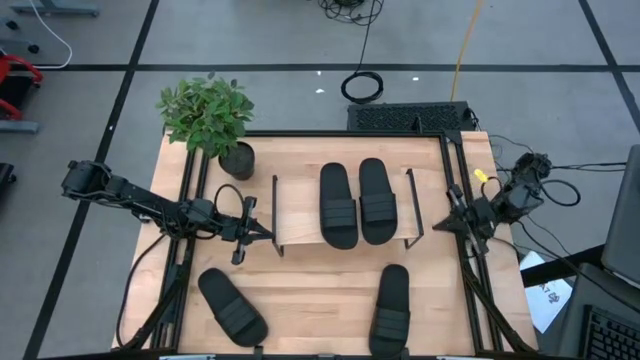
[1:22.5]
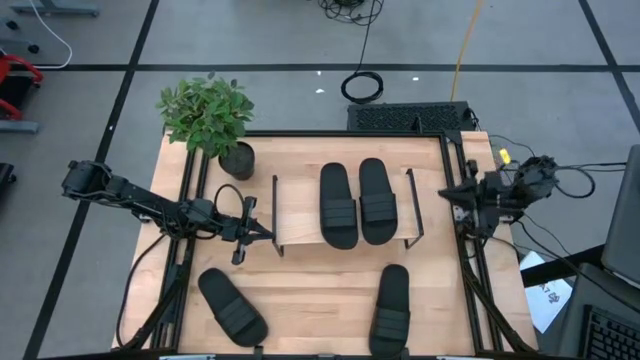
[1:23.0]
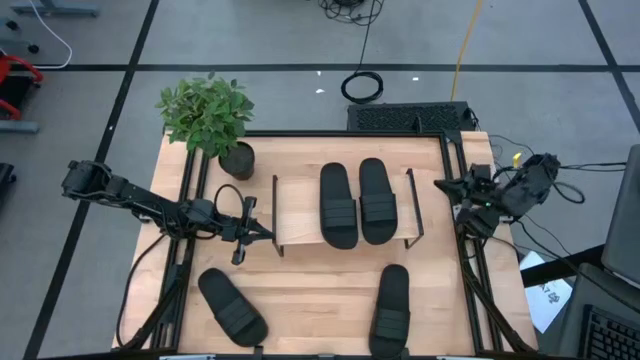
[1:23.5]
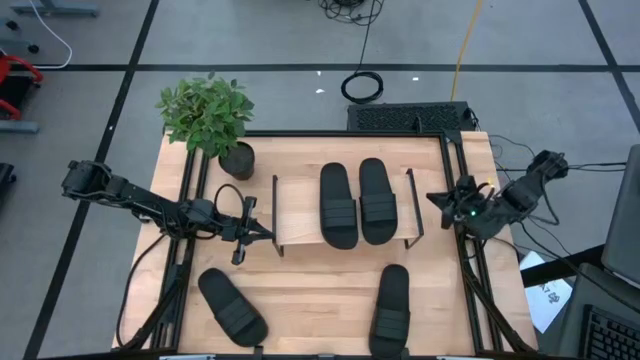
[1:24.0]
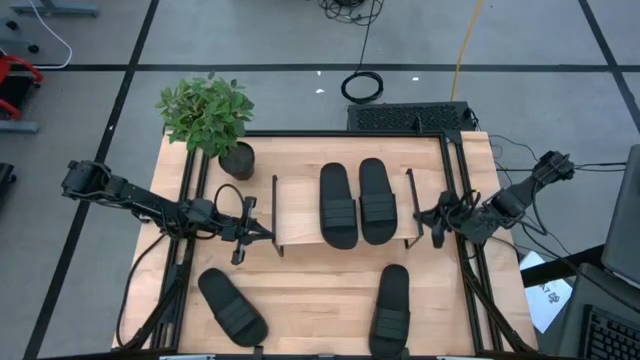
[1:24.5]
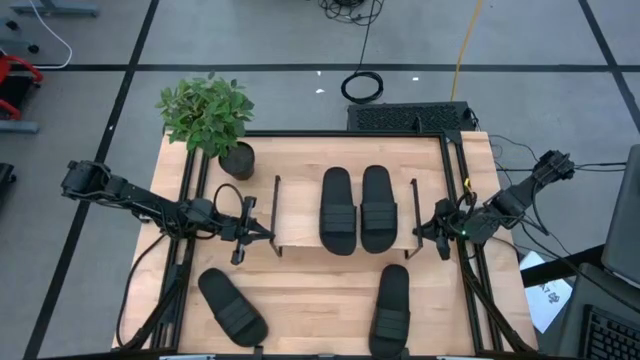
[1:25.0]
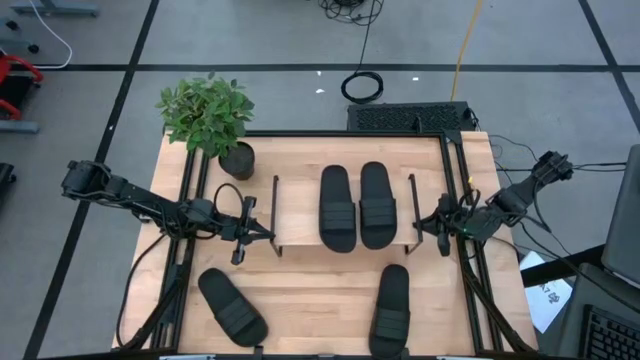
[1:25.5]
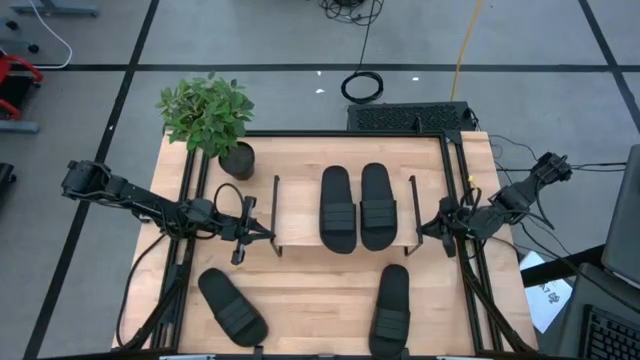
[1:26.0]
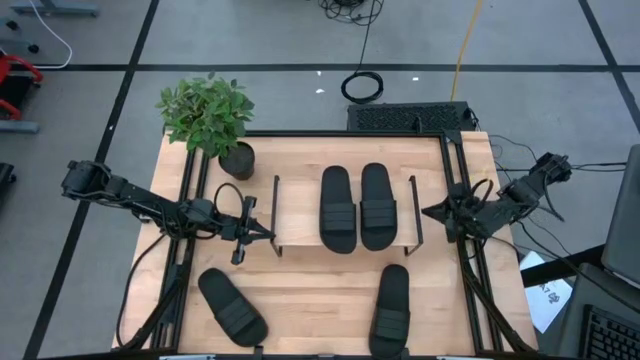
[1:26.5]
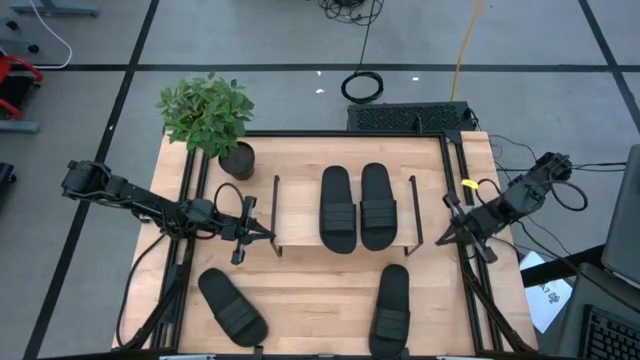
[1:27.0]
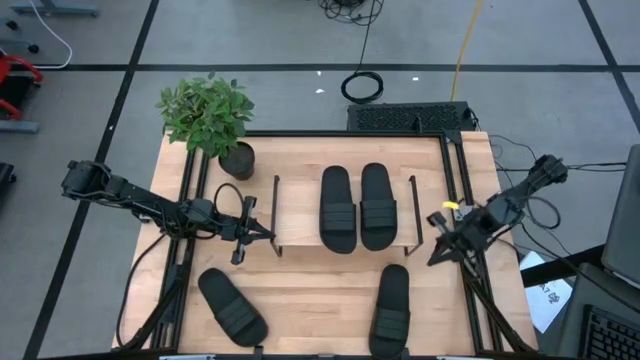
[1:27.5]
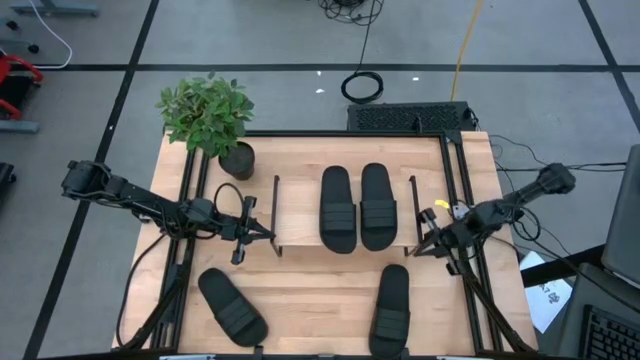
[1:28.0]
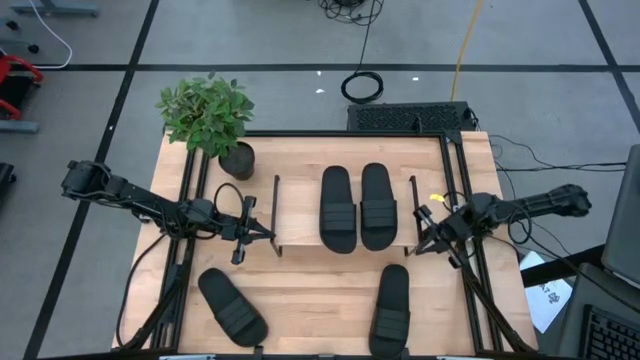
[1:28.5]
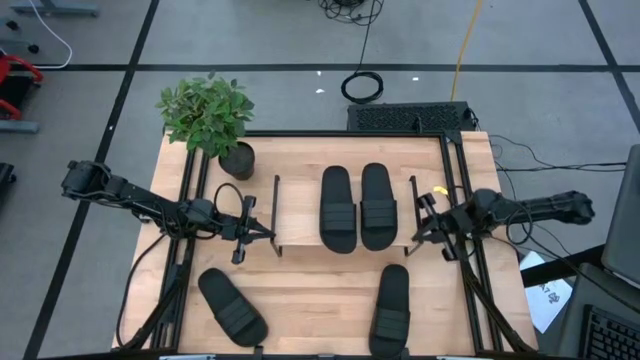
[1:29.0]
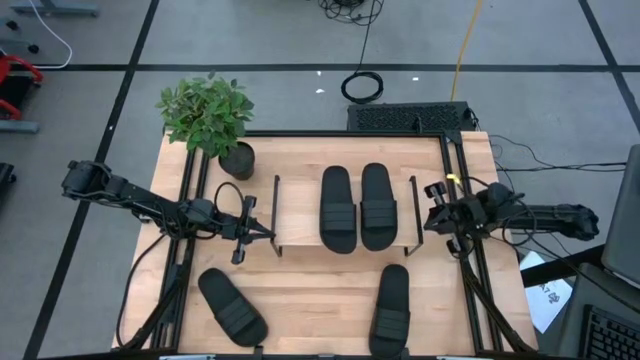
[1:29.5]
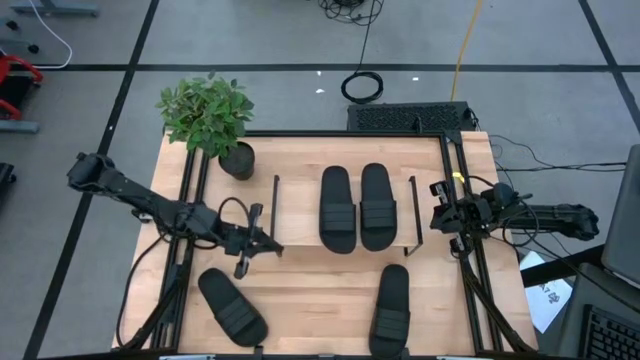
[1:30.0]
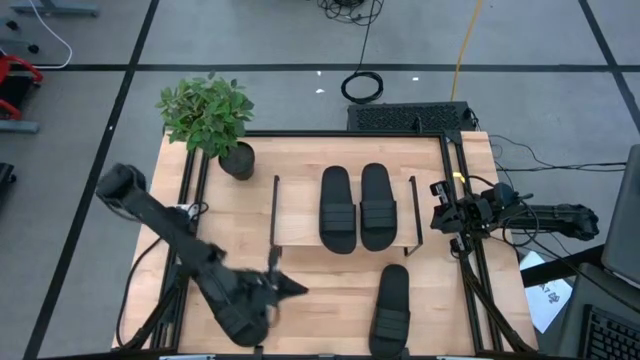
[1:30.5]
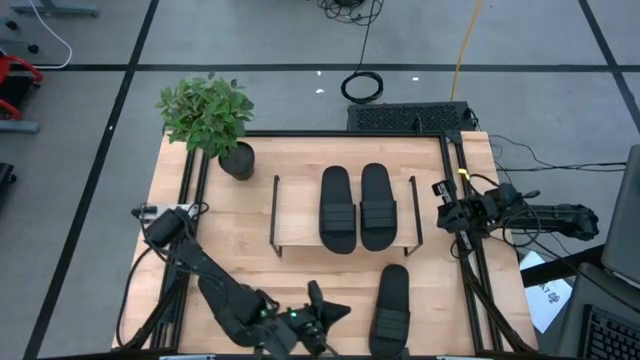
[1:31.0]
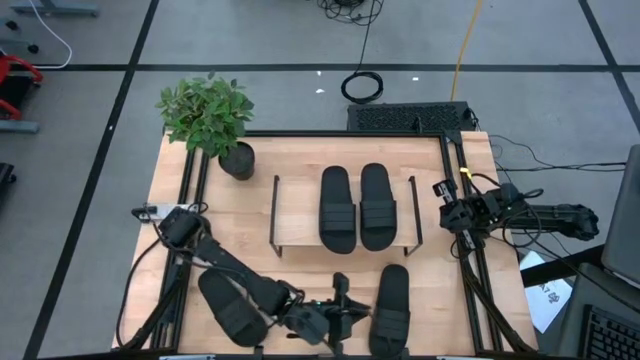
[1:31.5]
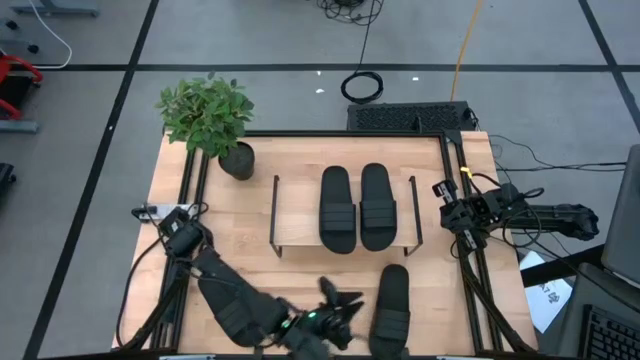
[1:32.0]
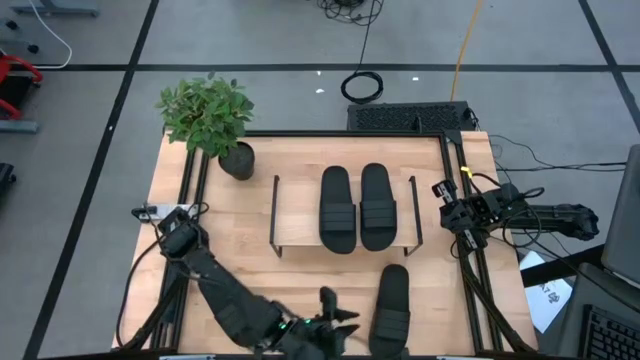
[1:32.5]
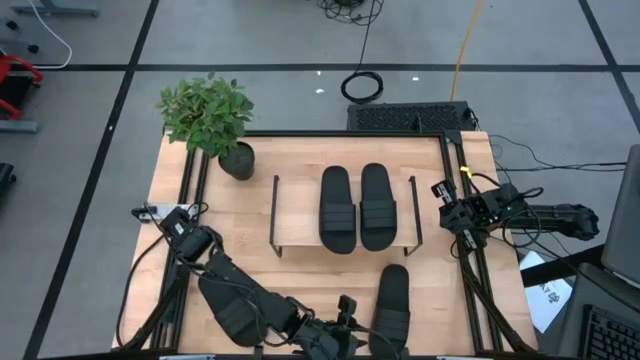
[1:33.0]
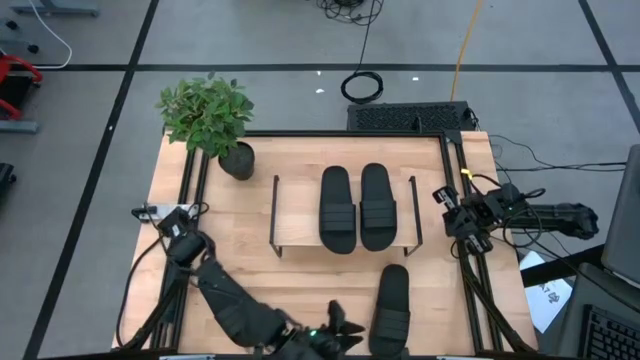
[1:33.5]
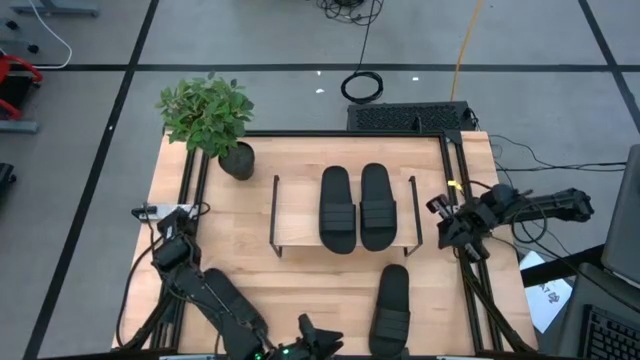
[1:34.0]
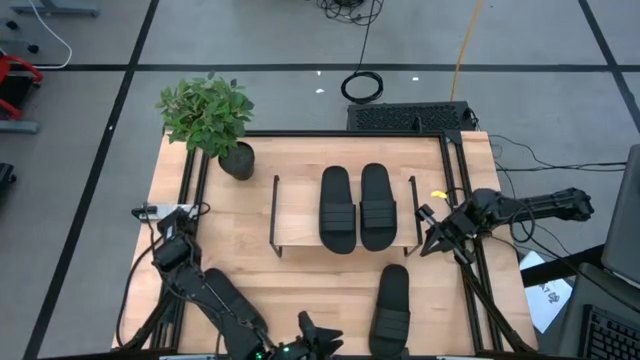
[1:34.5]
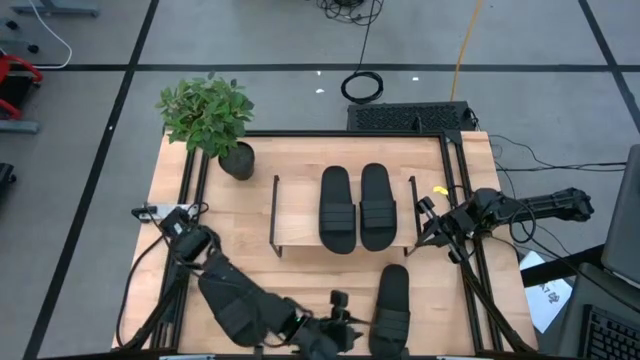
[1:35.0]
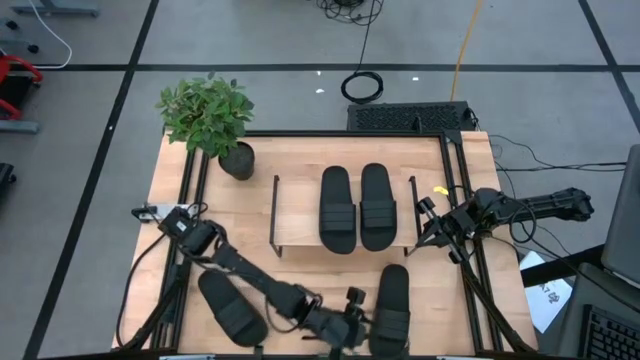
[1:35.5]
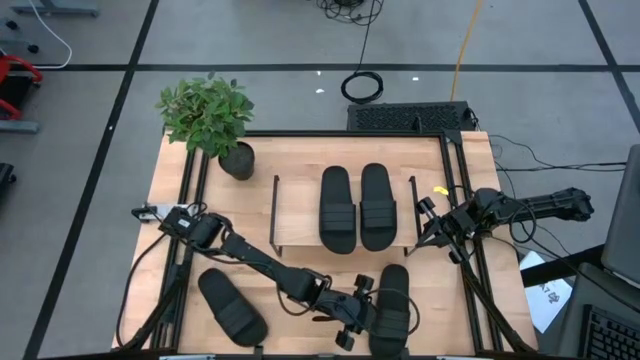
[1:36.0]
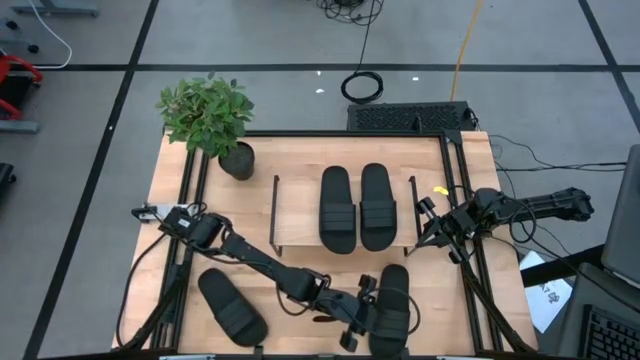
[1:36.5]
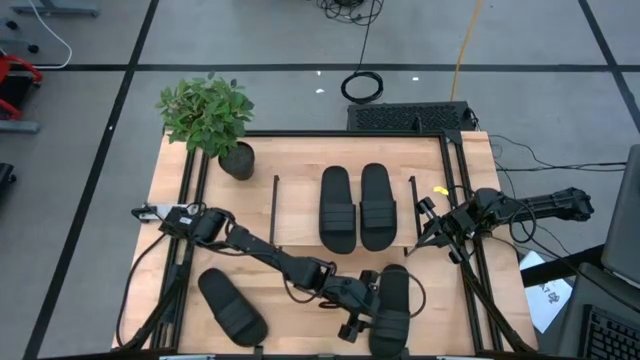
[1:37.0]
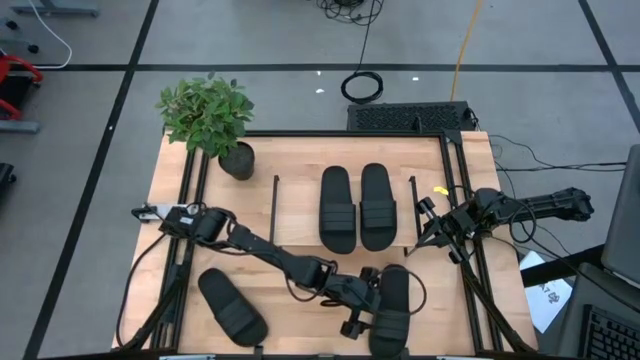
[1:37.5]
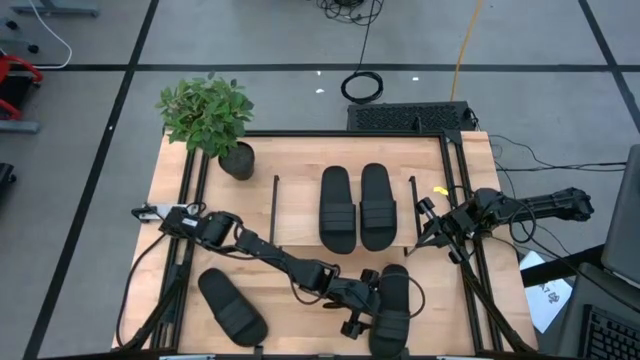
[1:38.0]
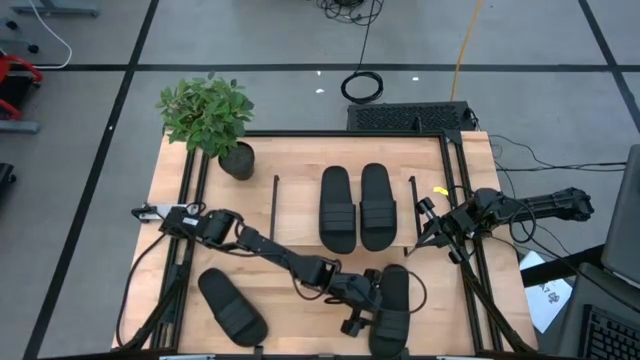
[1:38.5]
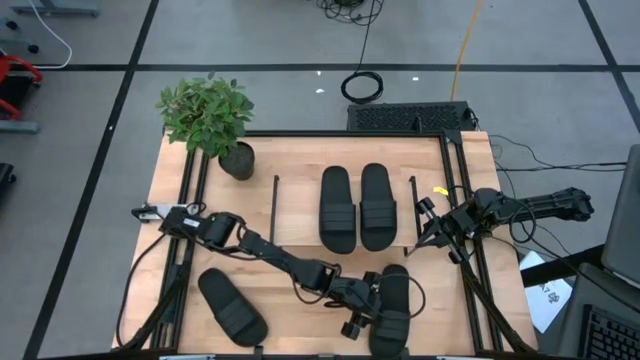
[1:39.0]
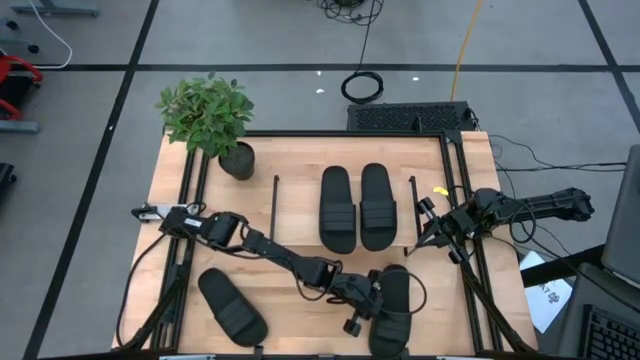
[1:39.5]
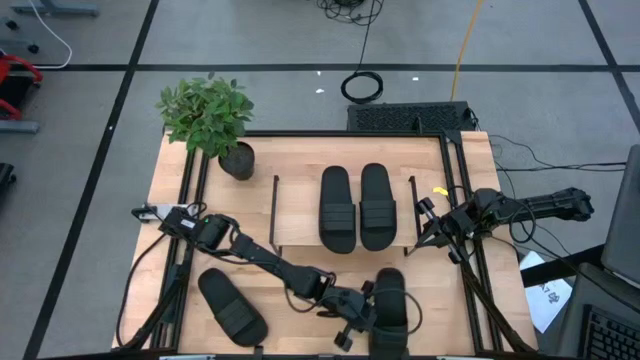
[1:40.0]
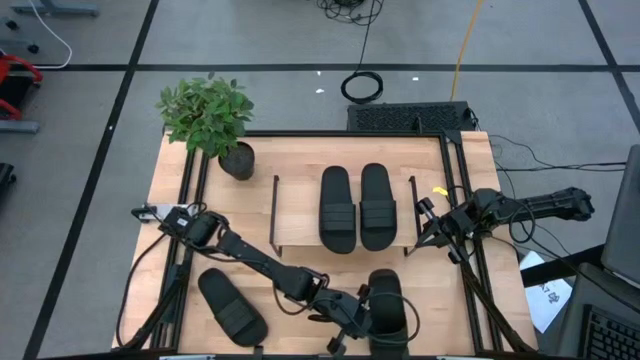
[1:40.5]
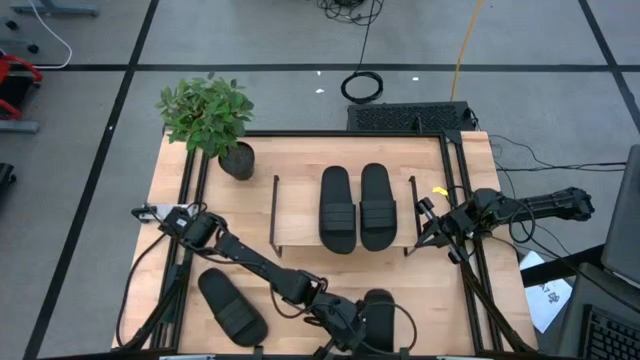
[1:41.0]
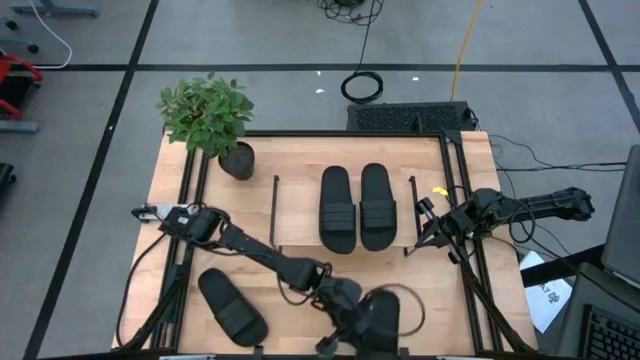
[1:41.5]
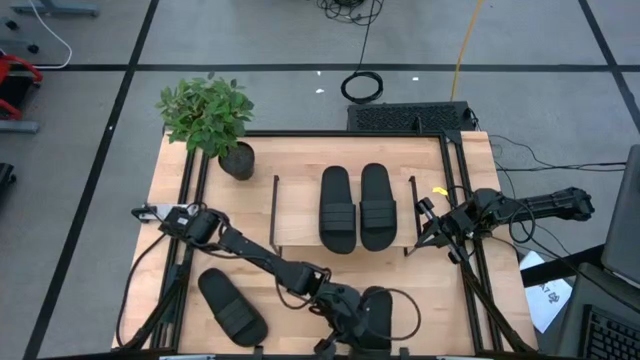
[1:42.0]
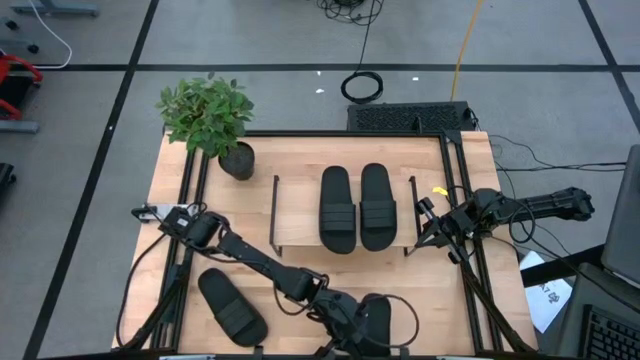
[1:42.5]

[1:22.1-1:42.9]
Task: Pick and place slides into the shelf
Put the black slide under the shelf
